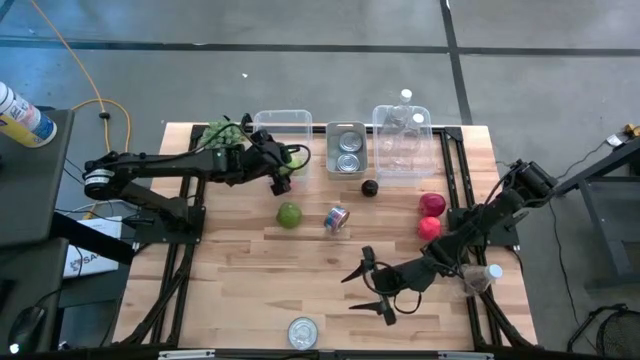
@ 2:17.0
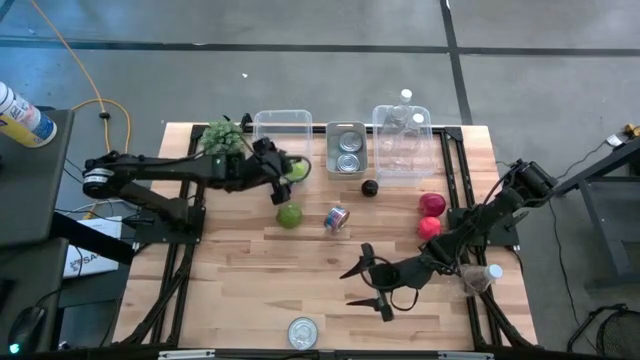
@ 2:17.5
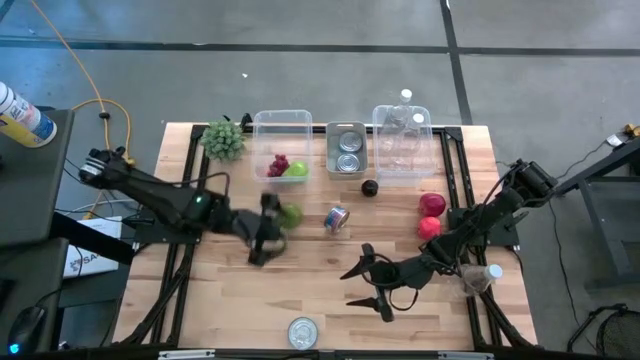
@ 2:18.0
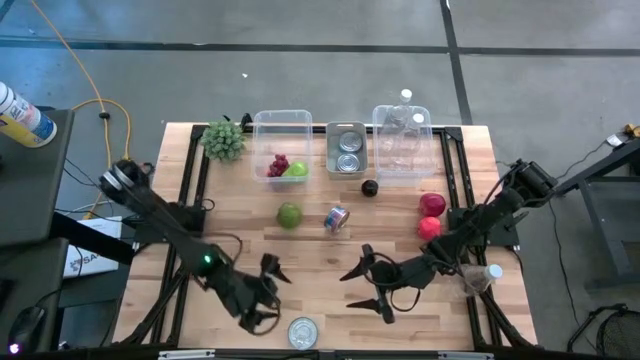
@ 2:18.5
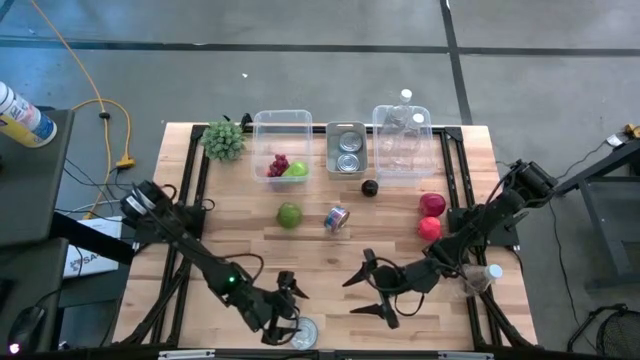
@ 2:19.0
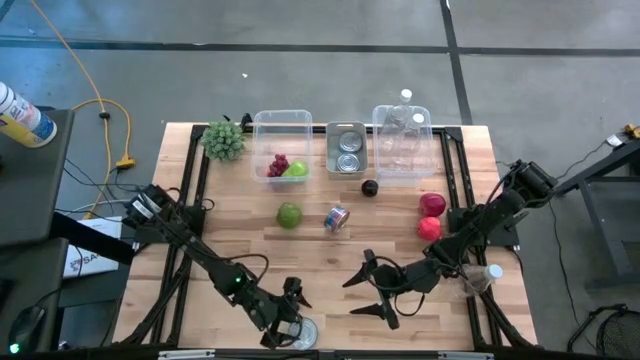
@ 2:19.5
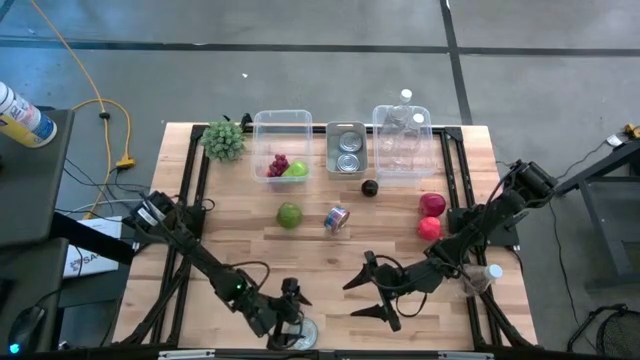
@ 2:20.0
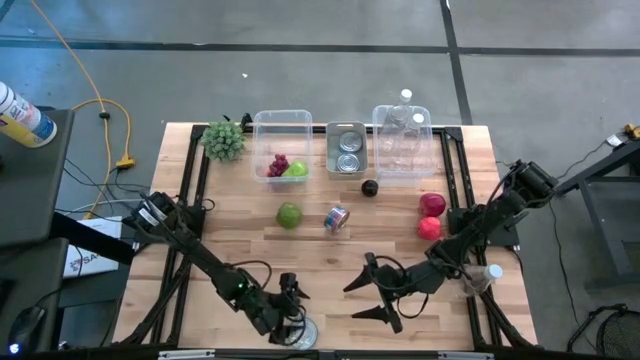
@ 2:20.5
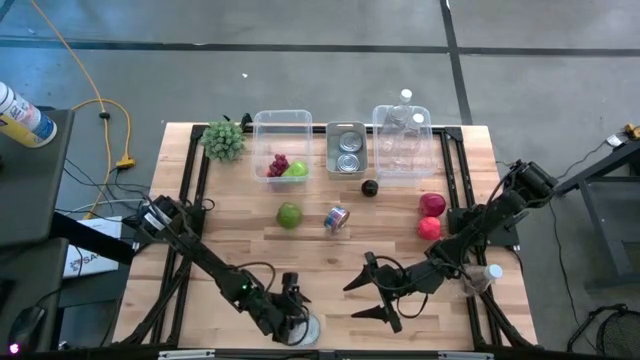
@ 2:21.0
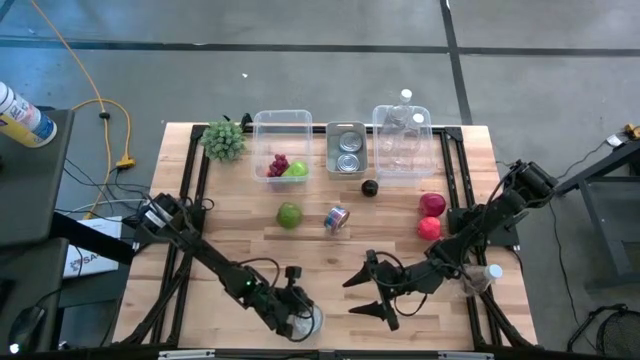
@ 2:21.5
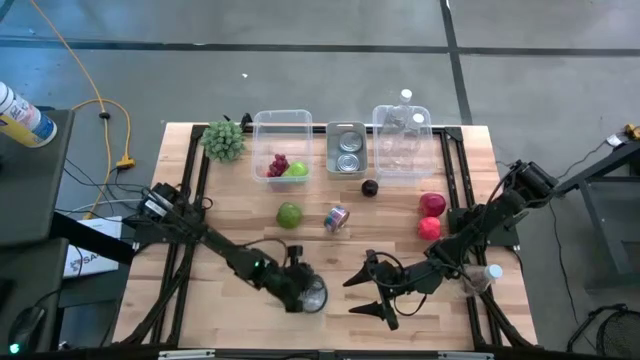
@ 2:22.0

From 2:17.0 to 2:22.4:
Task: Pick & Place Food Item
Put the green tuna can into the gray bin

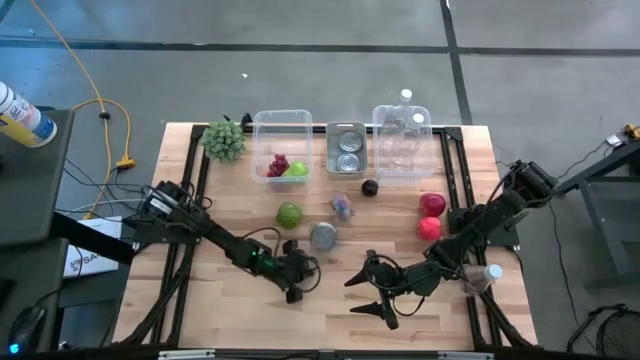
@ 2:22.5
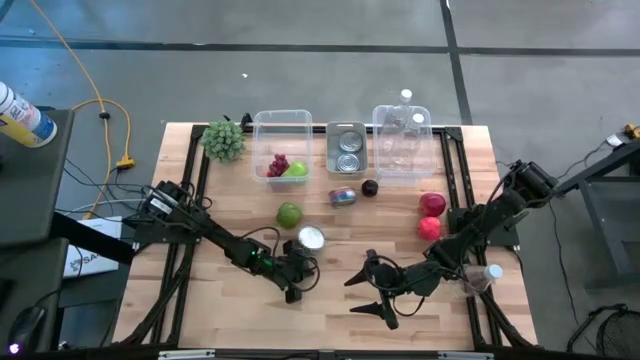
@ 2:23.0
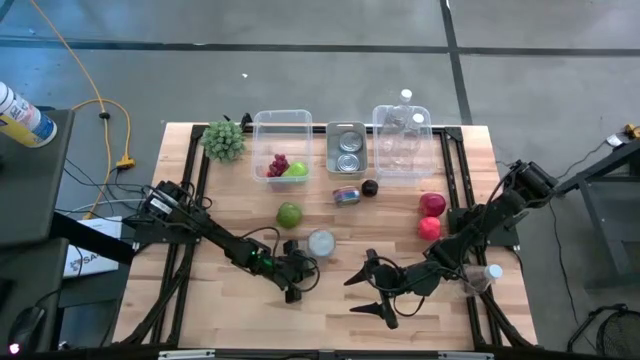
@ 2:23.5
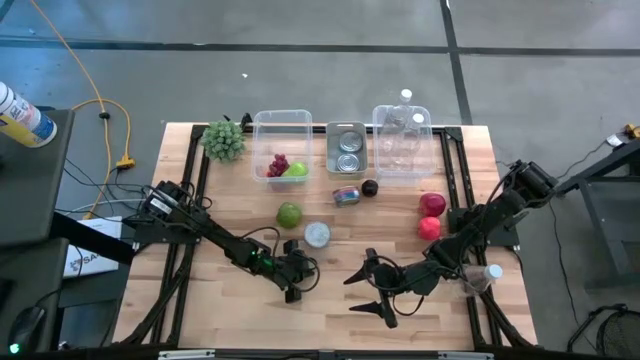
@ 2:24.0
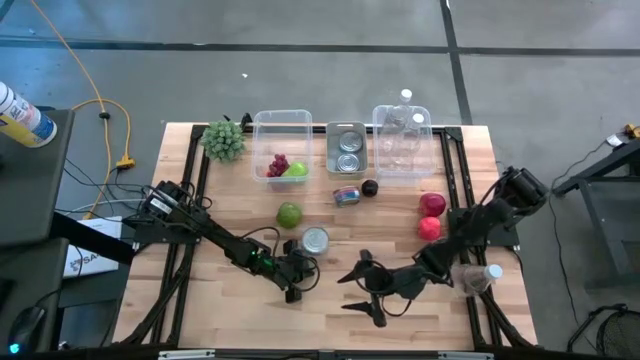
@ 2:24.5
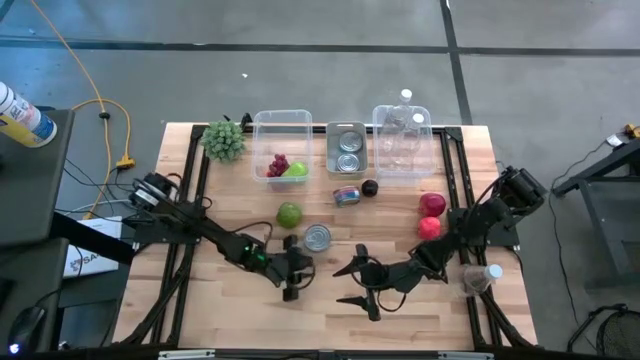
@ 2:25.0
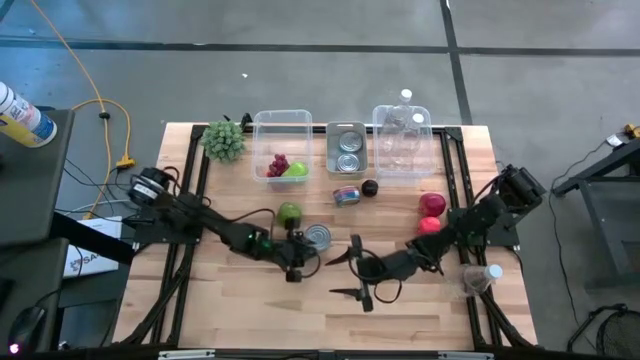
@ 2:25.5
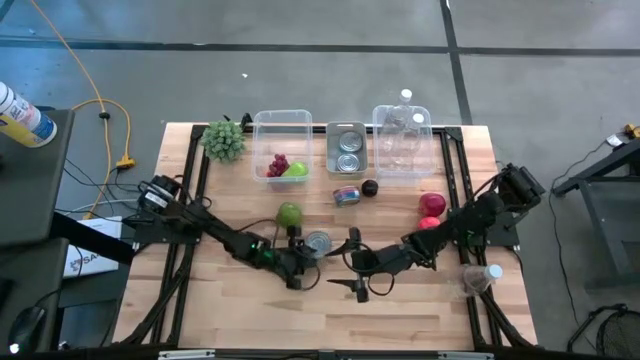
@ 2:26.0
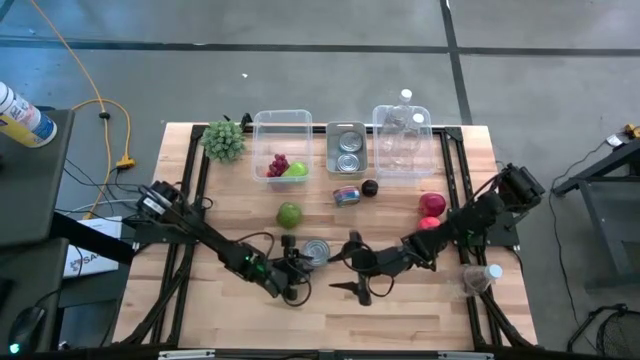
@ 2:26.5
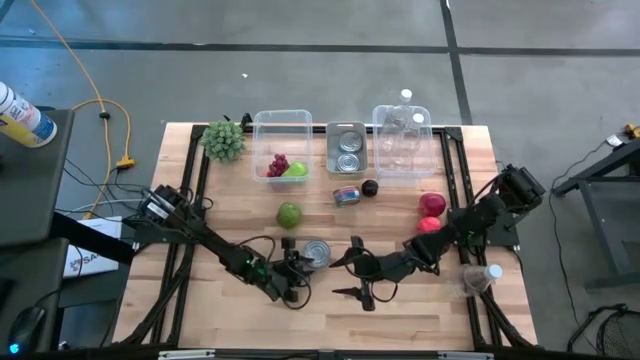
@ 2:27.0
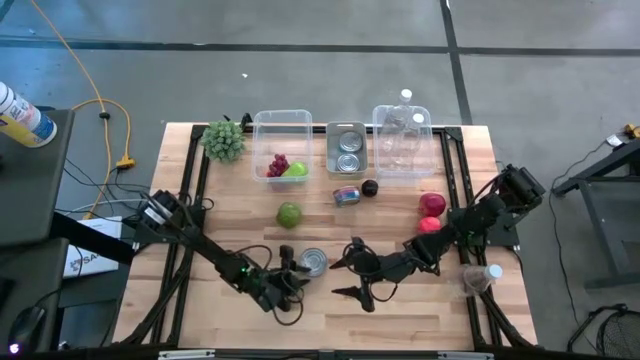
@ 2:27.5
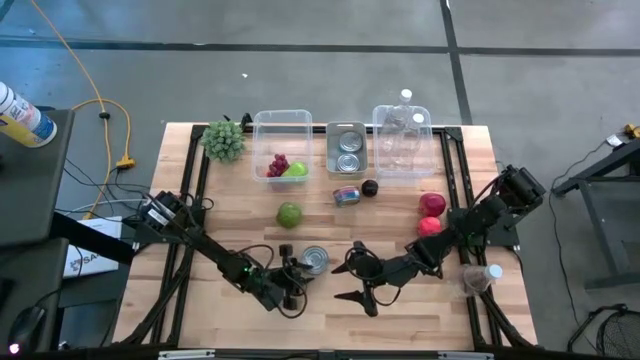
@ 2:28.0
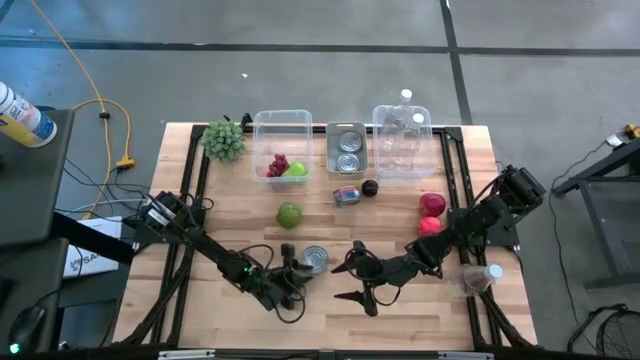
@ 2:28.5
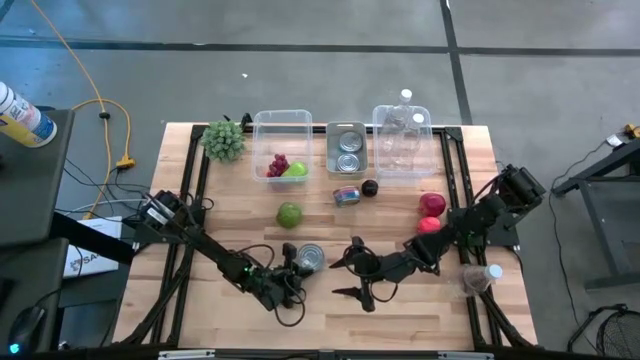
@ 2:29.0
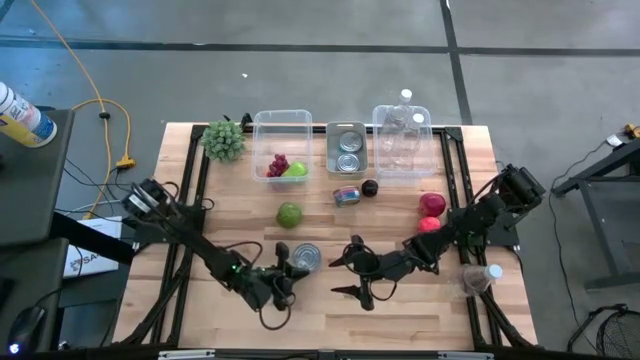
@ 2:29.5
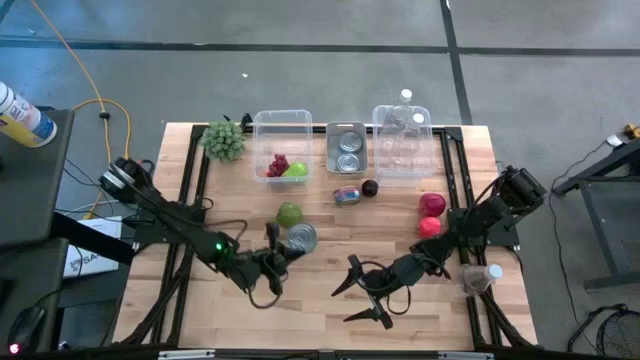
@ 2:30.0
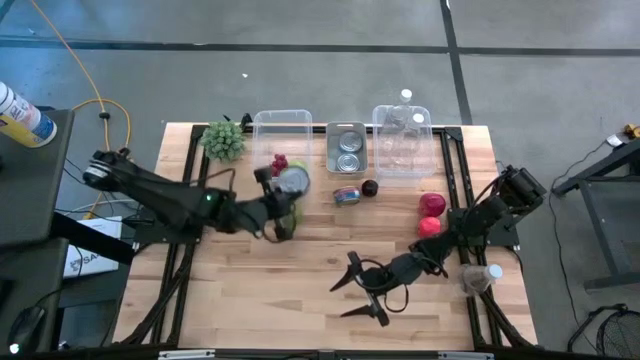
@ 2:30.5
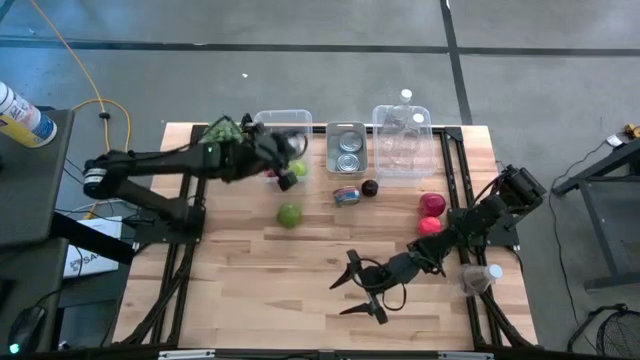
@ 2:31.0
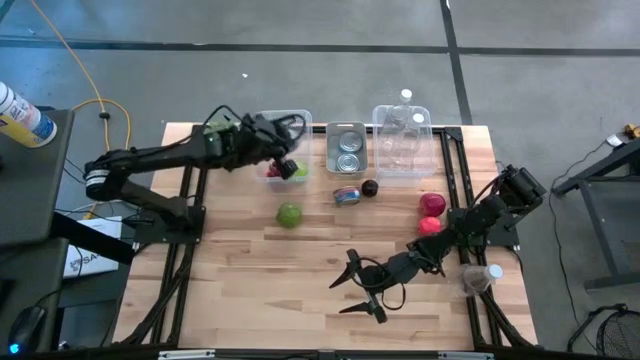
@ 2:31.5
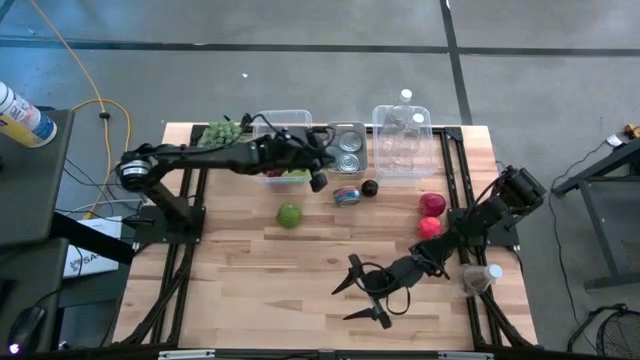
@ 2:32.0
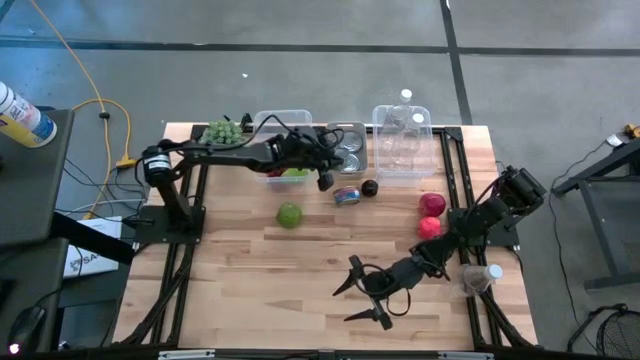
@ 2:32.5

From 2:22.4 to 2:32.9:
Put the green tuna can into the gray bin

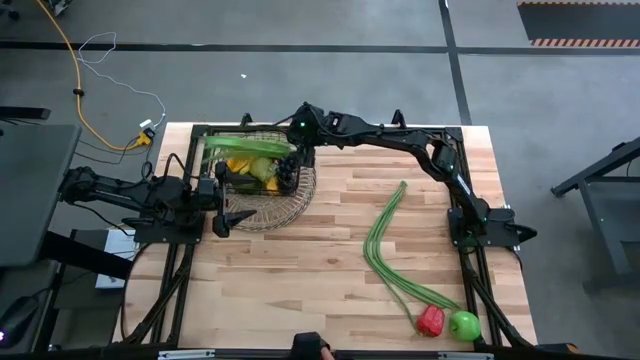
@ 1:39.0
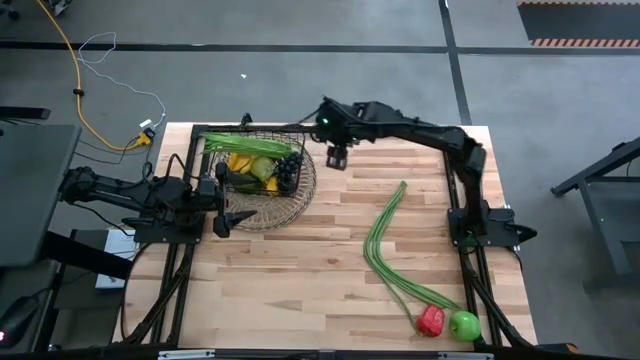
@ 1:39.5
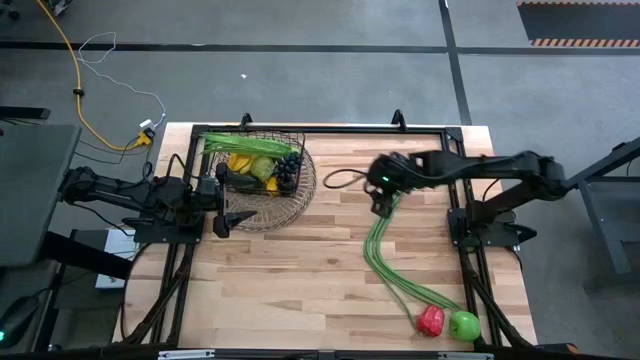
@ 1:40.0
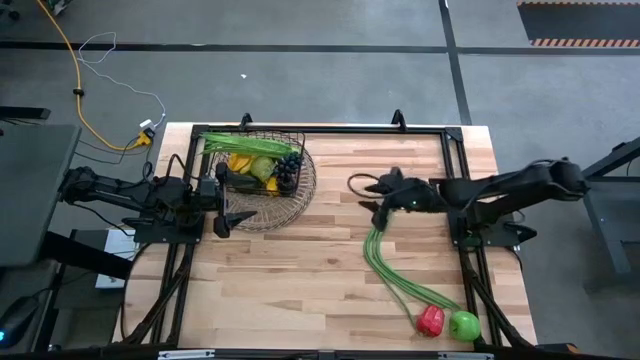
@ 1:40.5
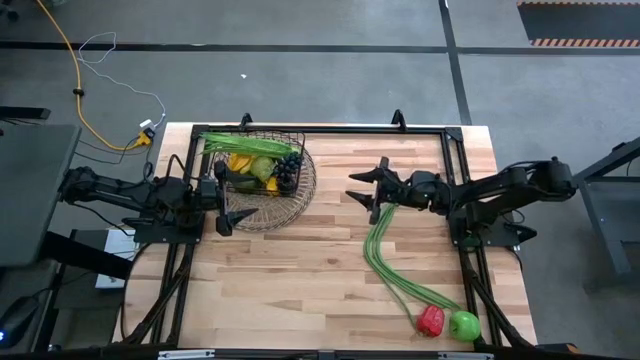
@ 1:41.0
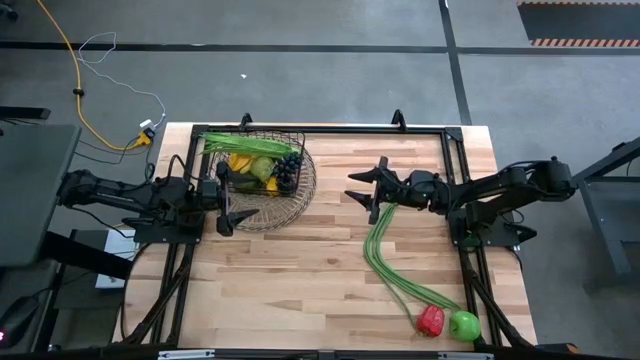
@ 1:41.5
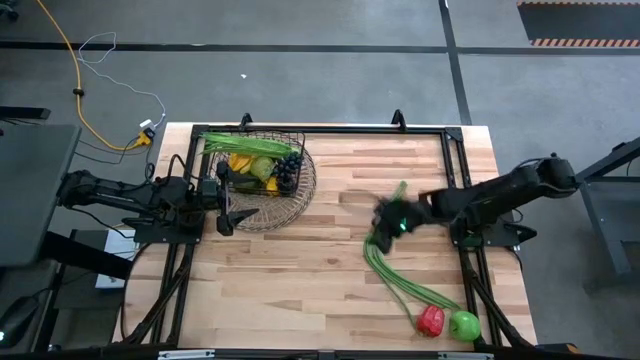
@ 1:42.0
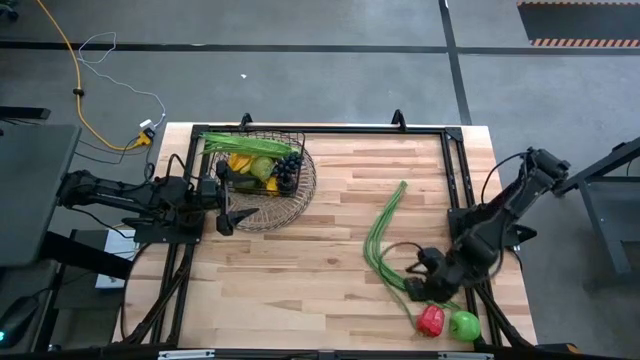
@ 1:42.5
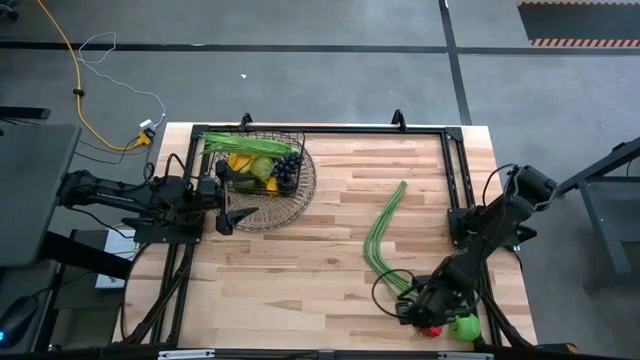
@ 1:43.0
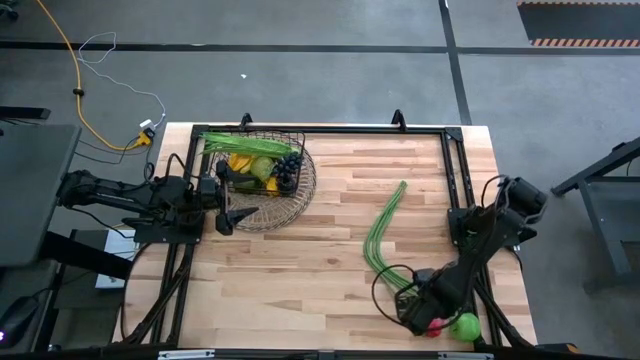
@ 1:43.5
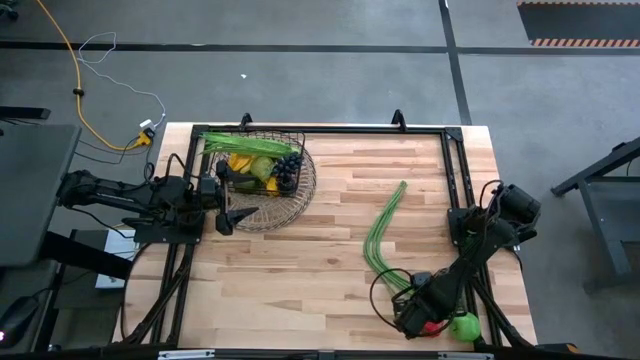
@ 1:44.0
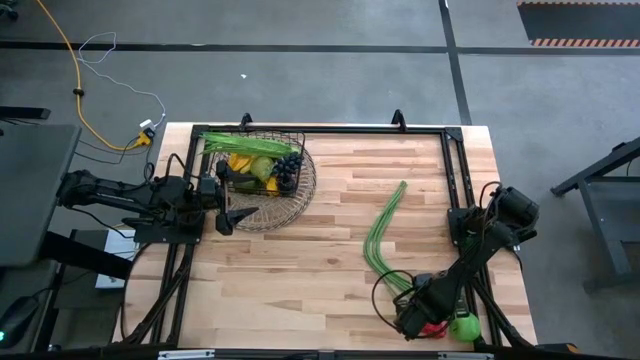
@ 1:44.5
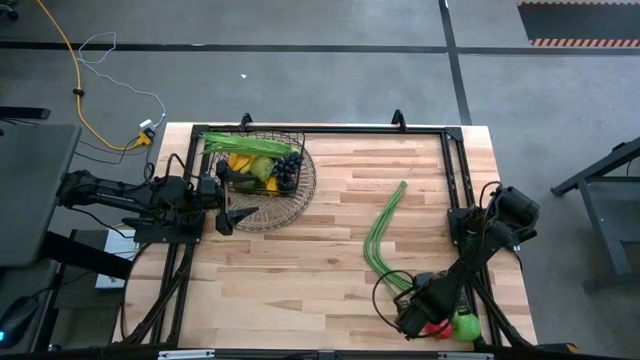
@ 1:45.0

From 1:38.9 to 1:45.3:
Task: Build produce basket
Put the red chili pepper into the wire basket
